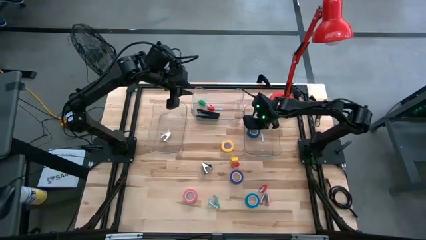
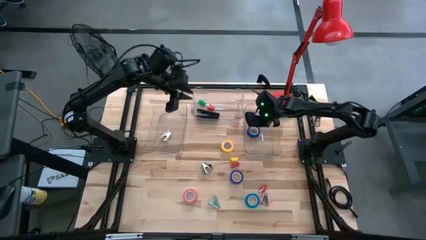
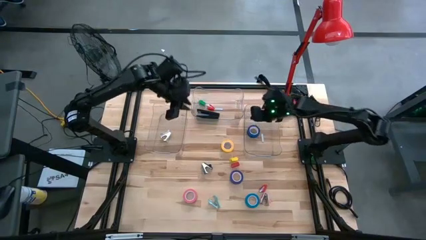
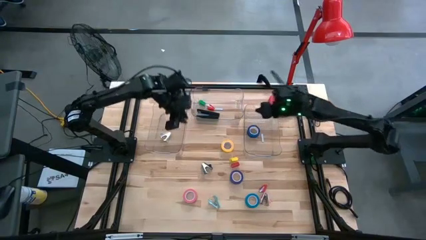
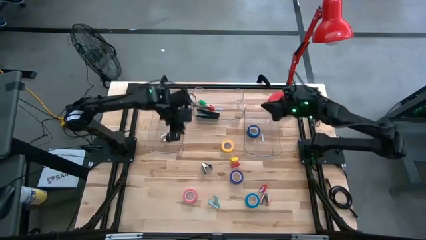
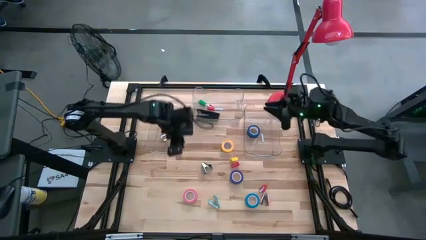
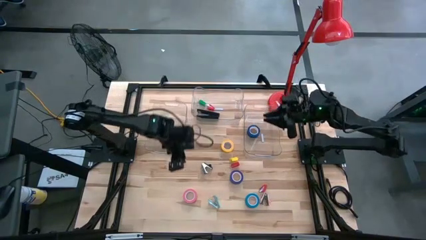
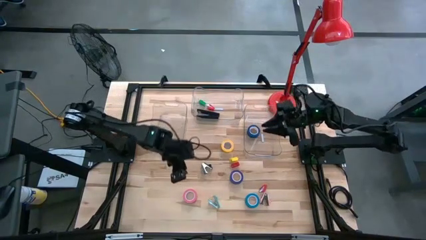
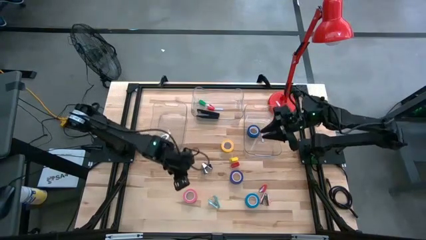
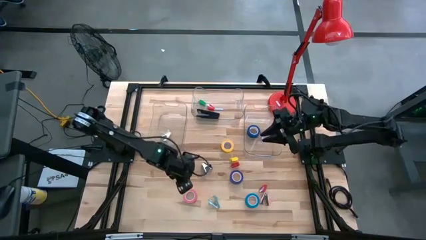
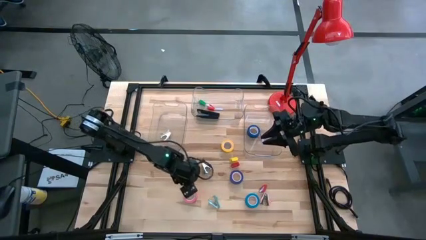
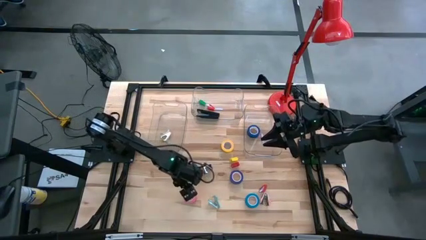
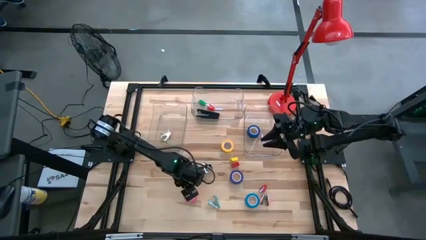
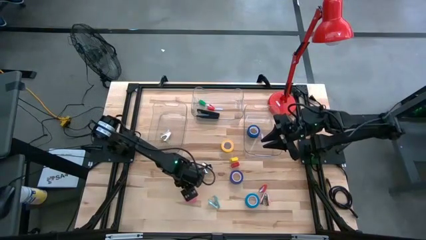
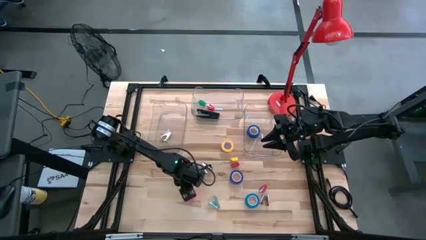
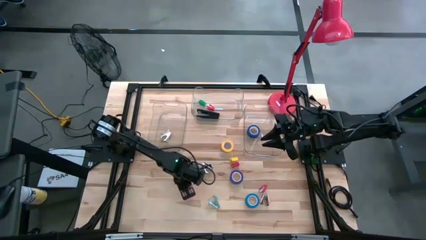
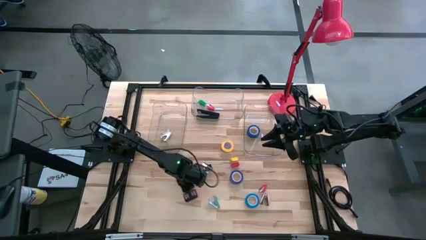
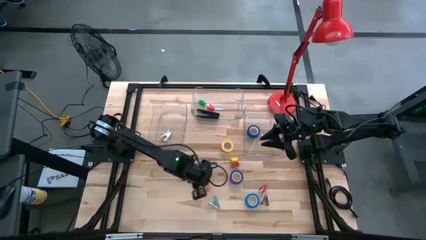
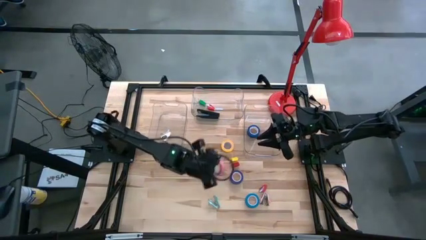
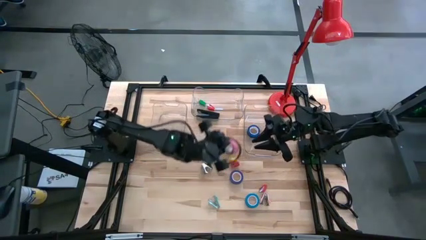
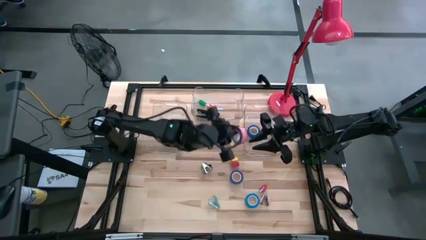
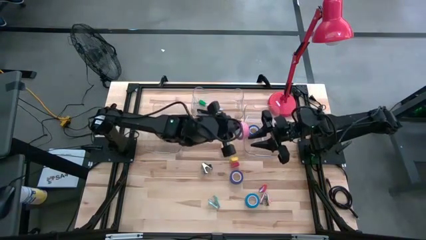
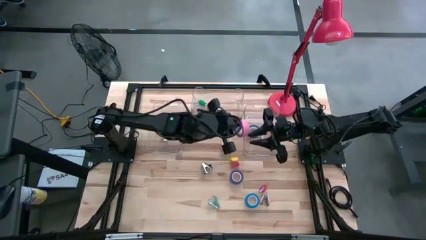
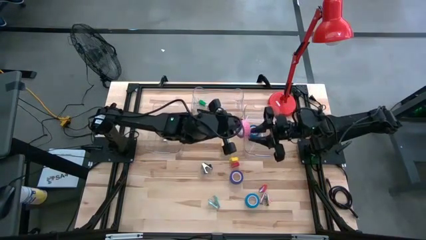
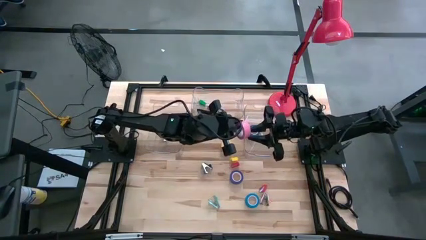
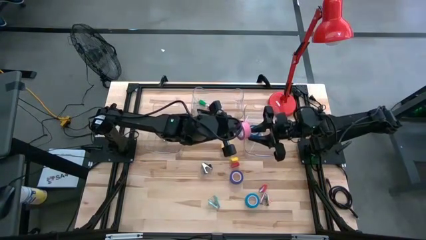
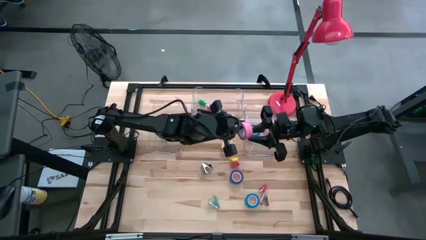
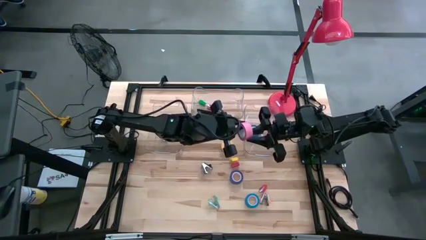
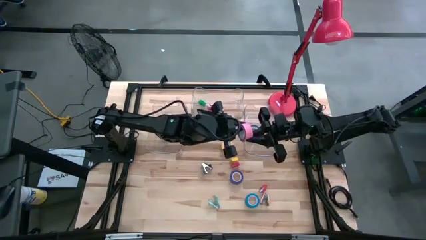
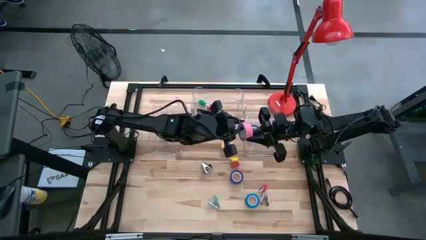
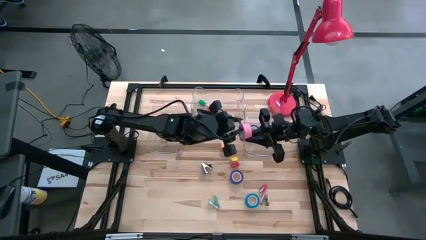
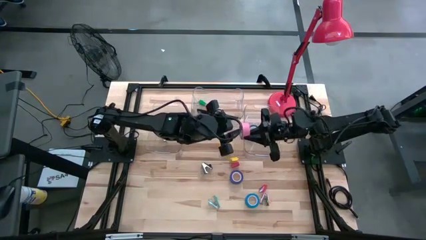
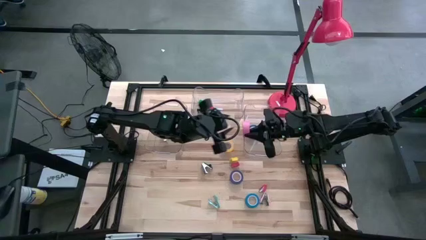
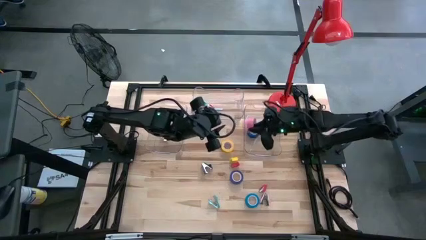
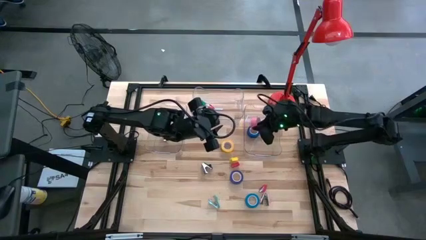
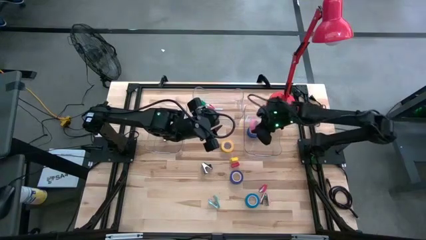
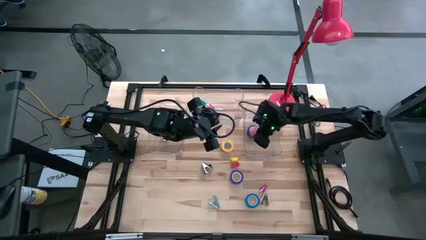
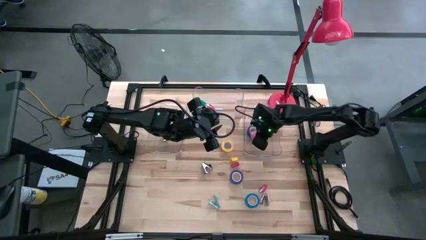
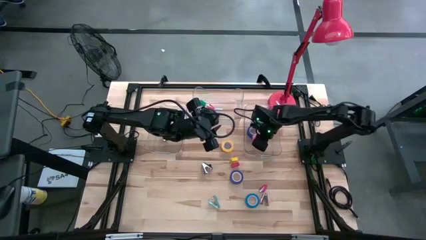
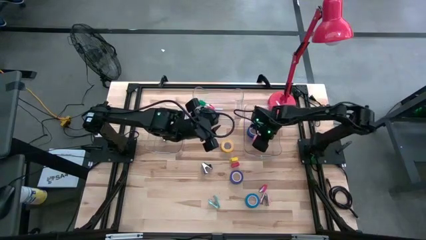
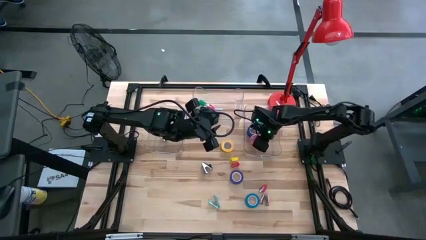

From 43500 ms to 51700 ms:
Task: Pick and place Stapler, Stapler remover, tape
Put the pink tape into the bottom right transparent bin

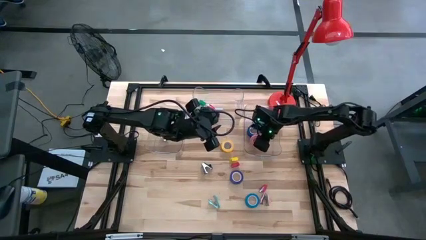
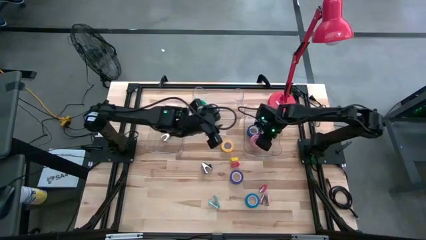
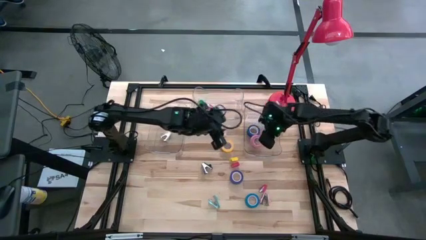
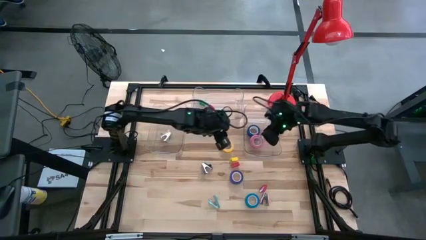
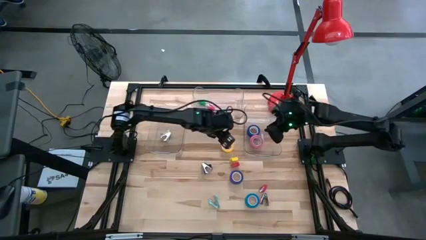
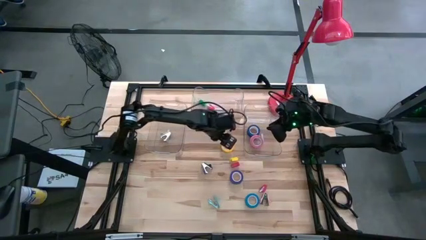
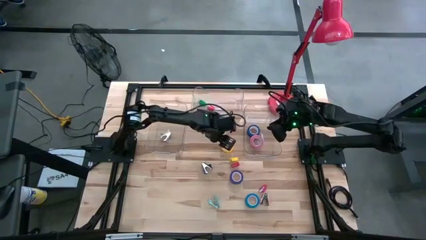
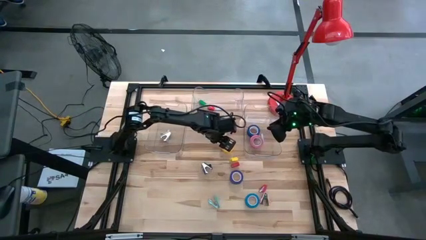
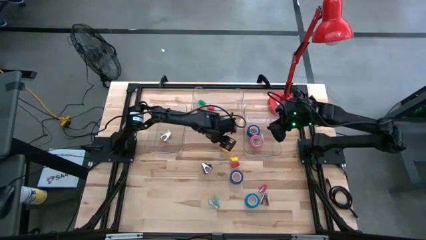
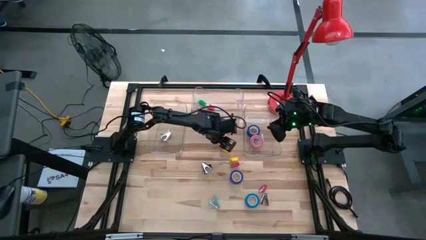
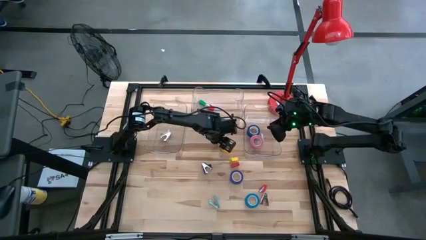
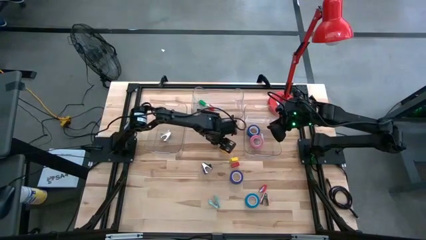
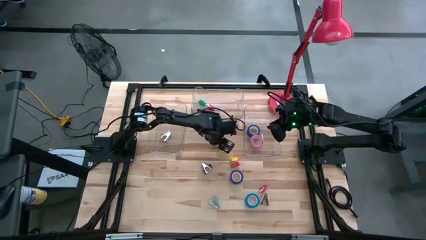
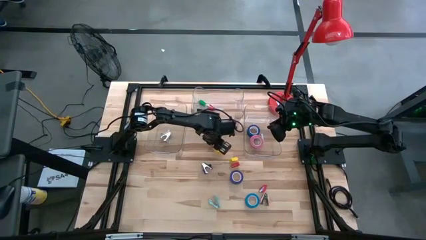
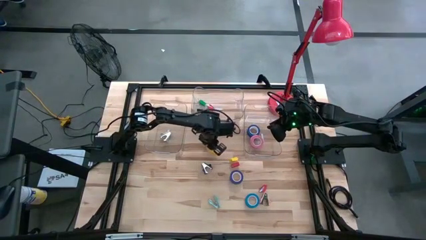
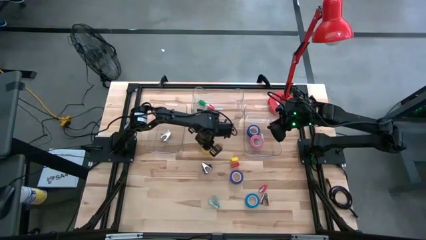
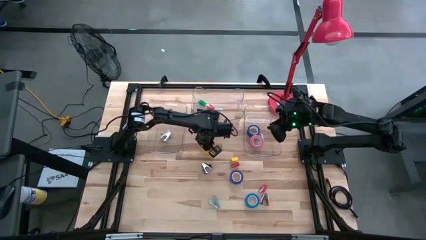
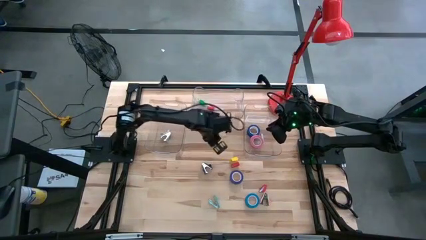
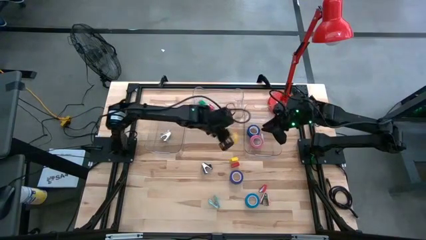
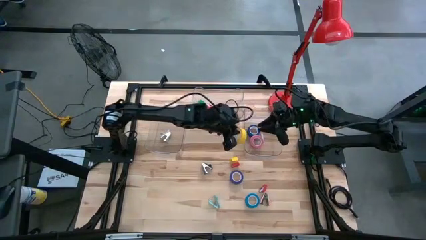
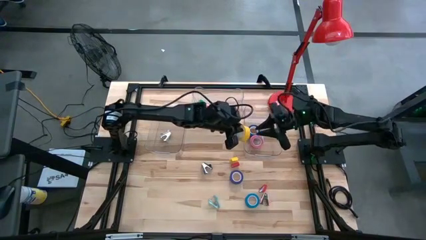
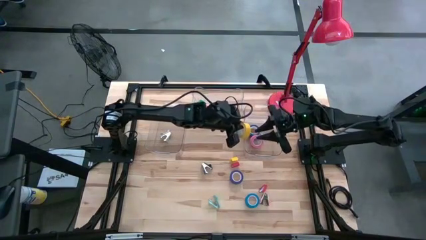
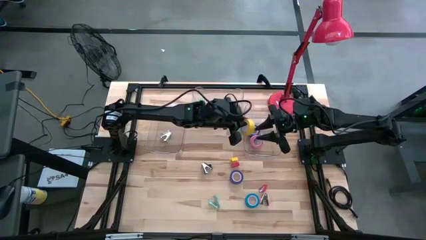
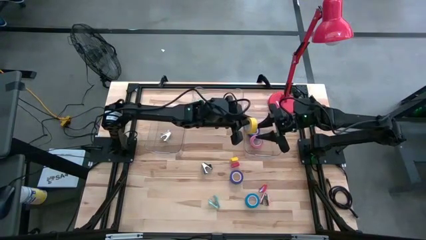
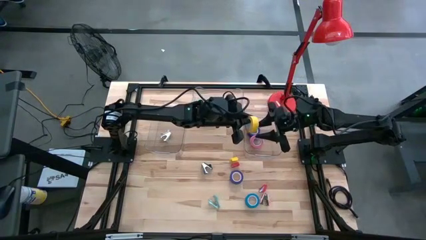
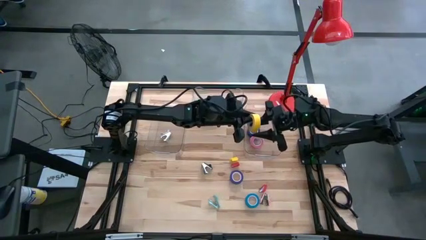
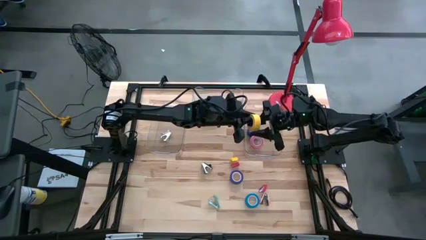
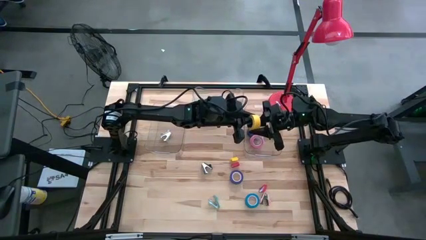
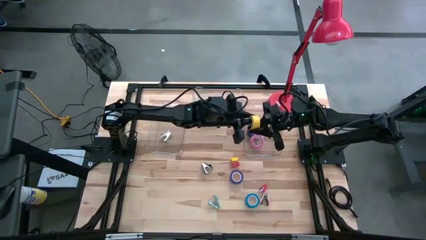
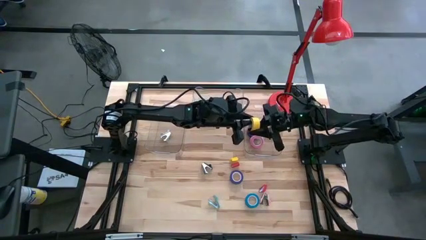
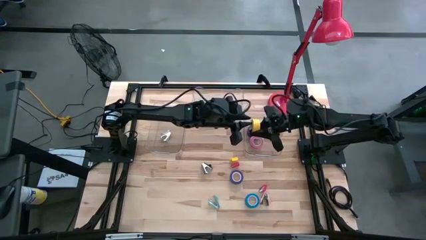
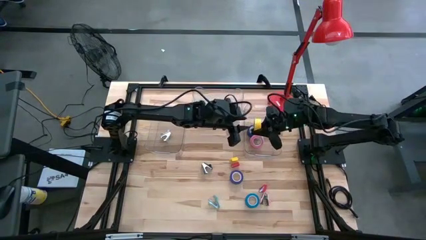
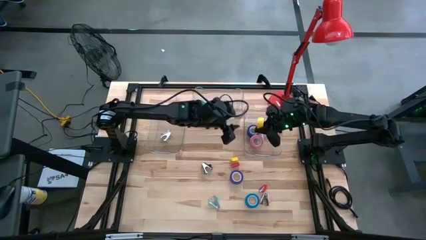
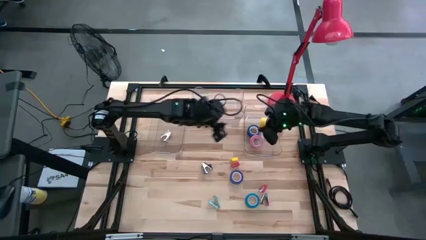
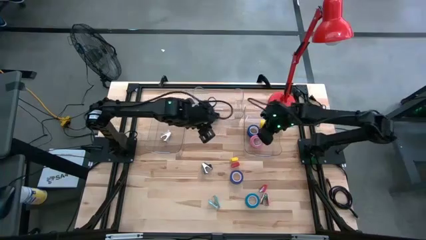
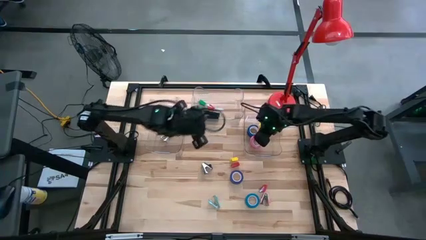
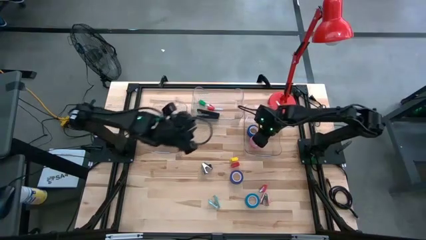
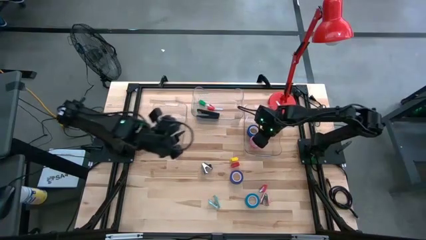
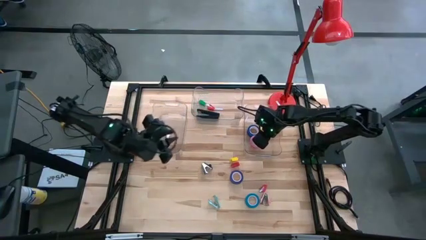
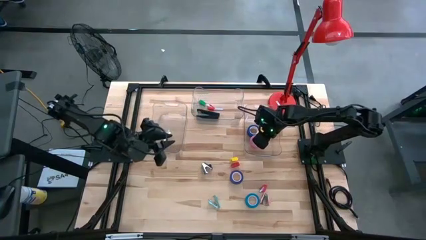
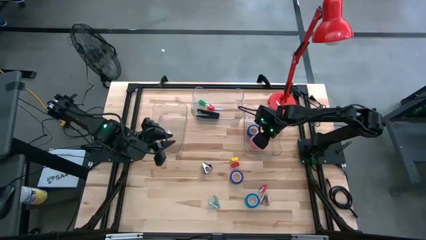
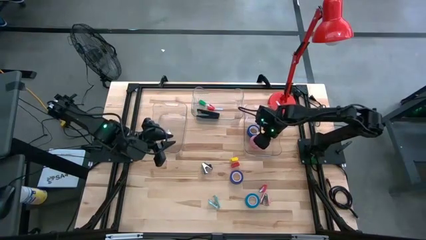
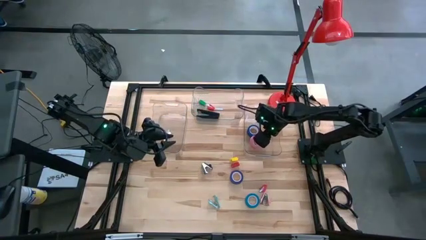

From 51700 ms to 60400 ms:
Put the yellow tape into the bottom right transparent bin
